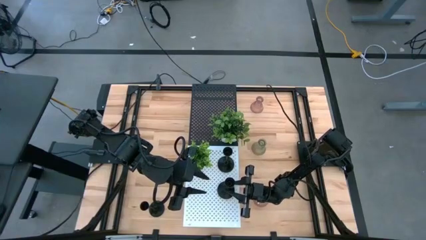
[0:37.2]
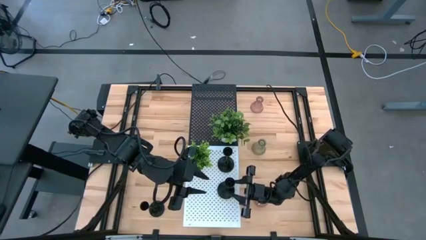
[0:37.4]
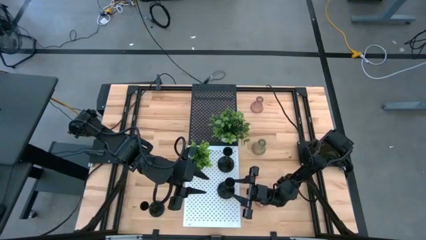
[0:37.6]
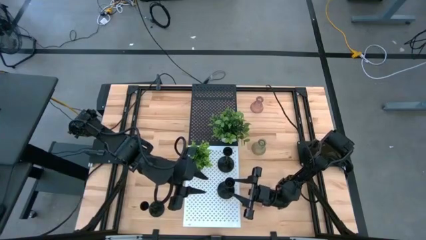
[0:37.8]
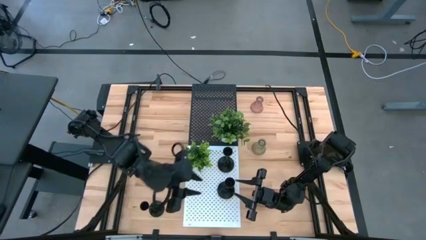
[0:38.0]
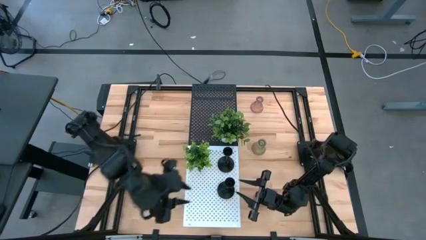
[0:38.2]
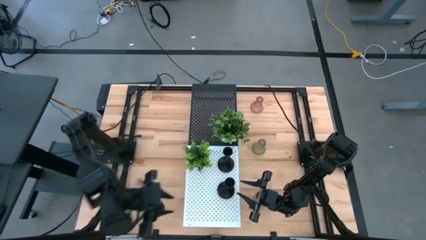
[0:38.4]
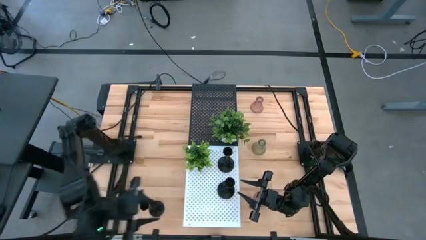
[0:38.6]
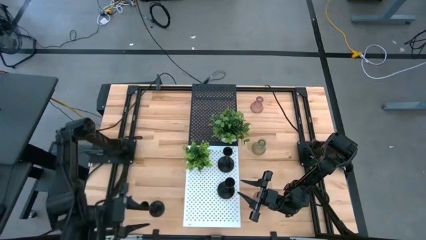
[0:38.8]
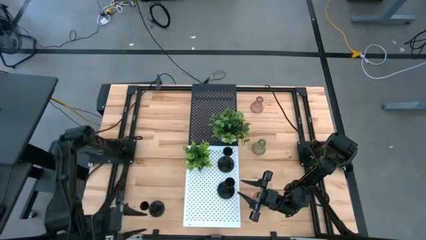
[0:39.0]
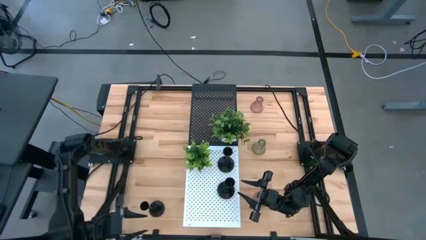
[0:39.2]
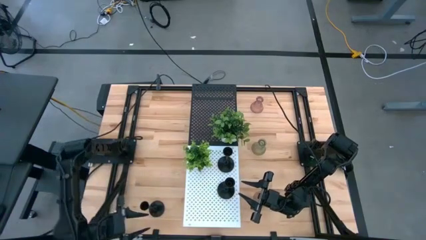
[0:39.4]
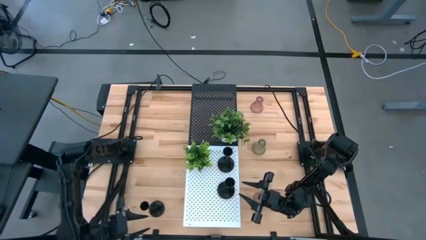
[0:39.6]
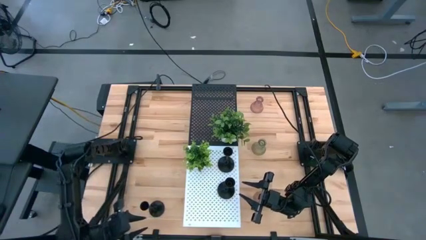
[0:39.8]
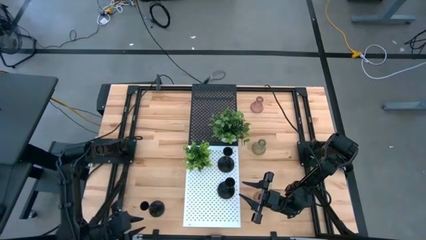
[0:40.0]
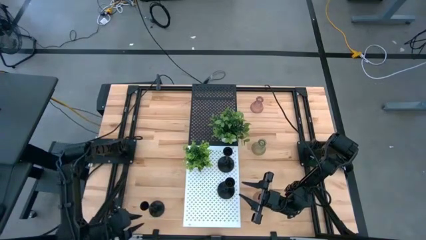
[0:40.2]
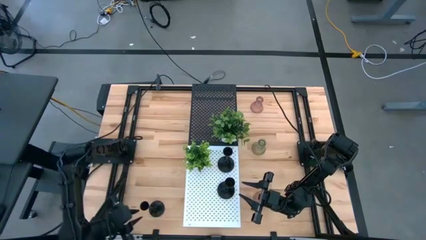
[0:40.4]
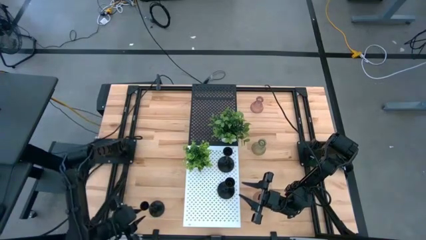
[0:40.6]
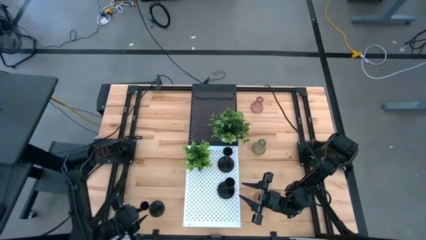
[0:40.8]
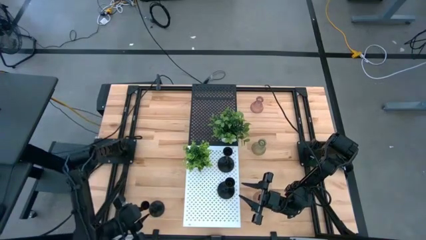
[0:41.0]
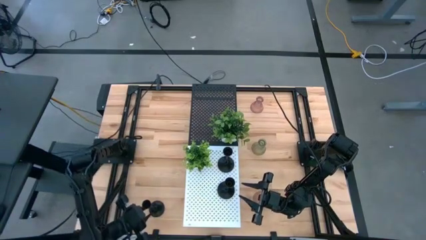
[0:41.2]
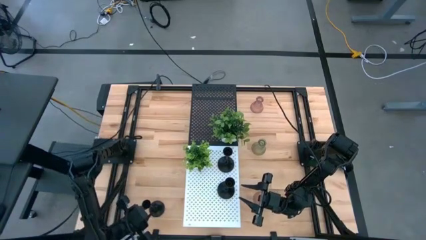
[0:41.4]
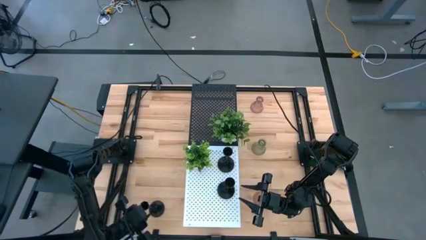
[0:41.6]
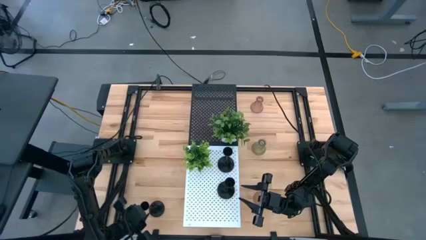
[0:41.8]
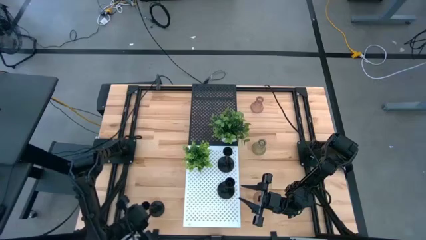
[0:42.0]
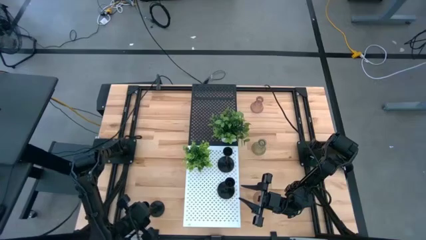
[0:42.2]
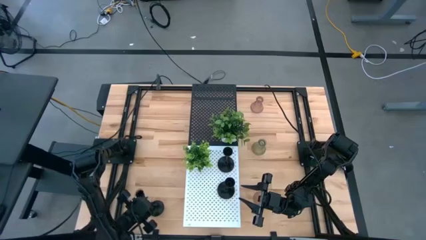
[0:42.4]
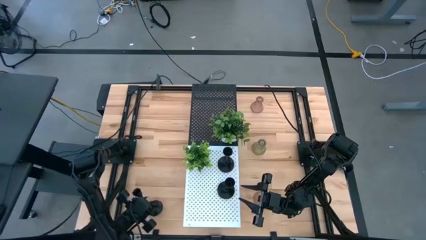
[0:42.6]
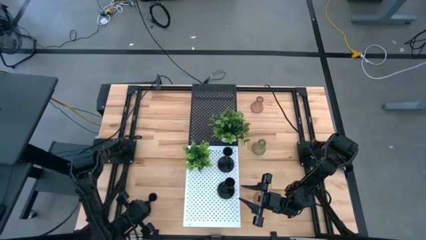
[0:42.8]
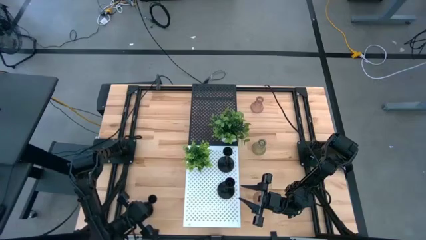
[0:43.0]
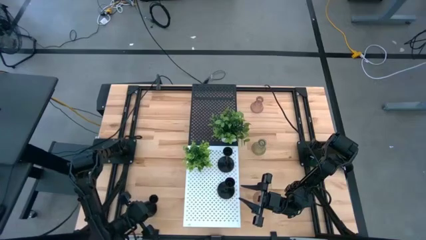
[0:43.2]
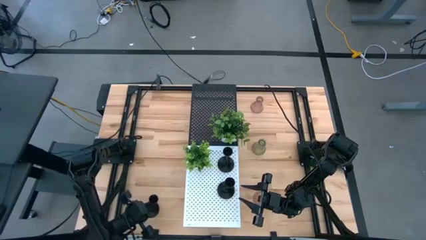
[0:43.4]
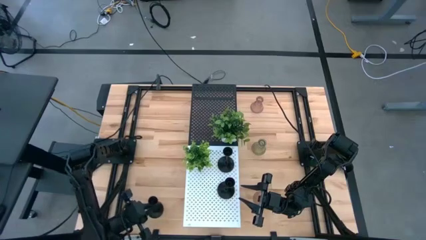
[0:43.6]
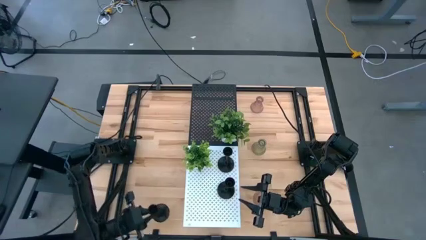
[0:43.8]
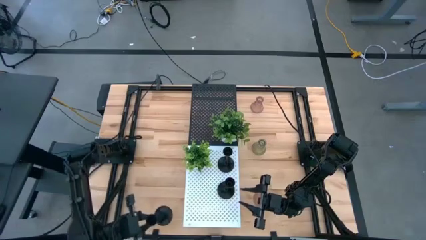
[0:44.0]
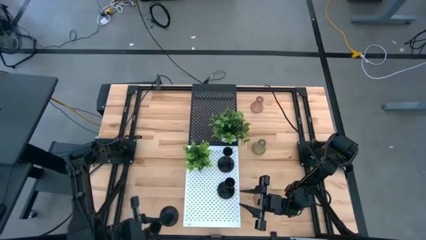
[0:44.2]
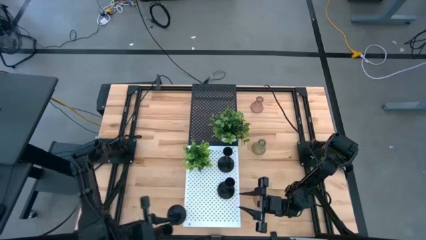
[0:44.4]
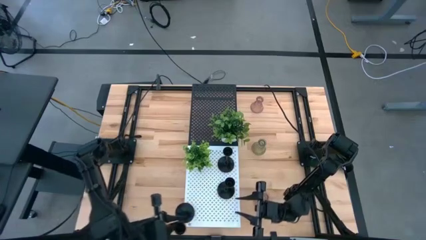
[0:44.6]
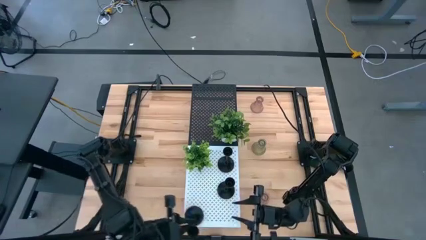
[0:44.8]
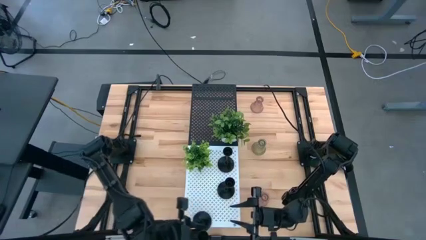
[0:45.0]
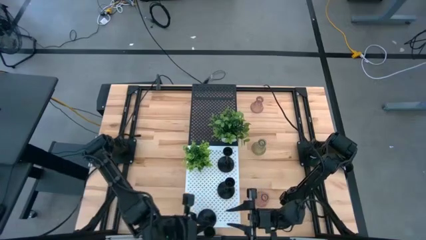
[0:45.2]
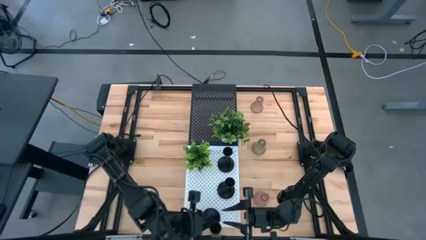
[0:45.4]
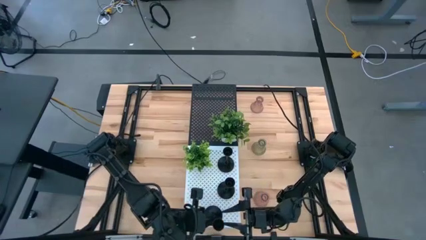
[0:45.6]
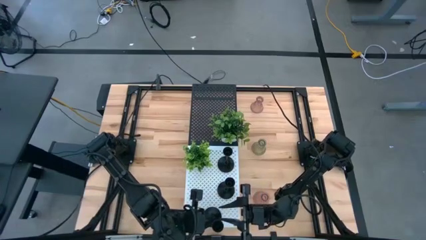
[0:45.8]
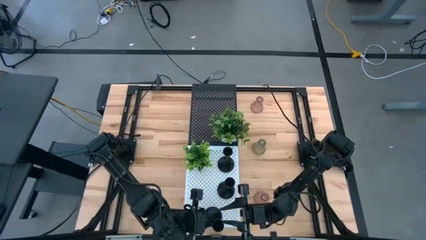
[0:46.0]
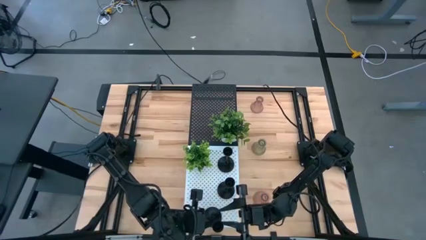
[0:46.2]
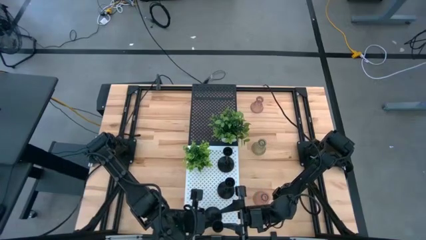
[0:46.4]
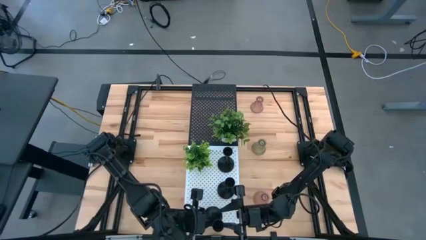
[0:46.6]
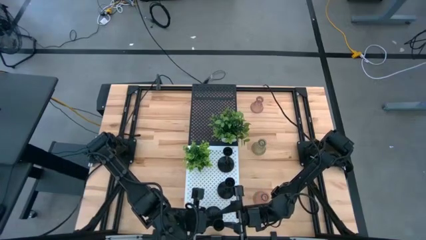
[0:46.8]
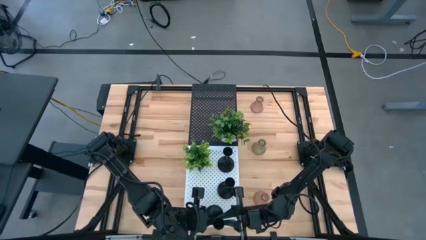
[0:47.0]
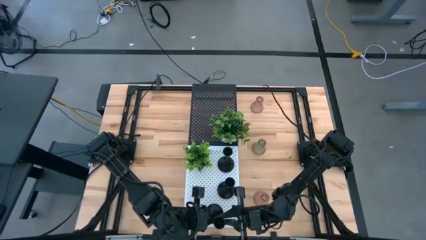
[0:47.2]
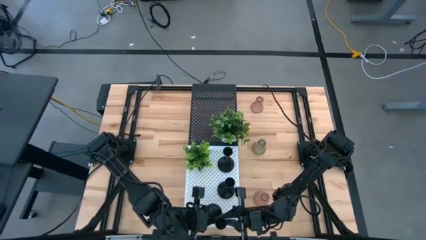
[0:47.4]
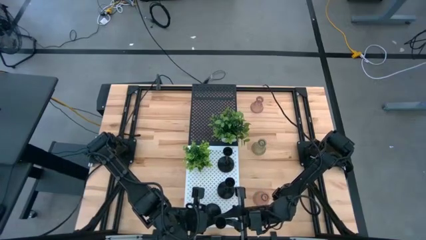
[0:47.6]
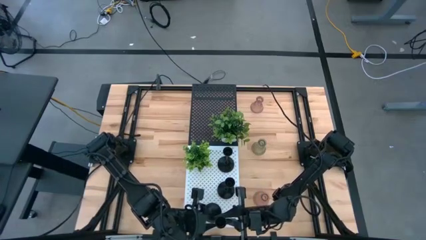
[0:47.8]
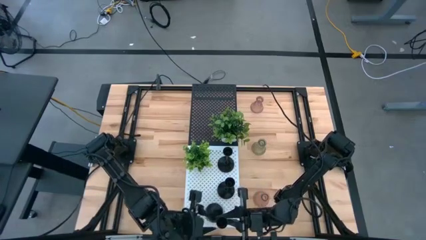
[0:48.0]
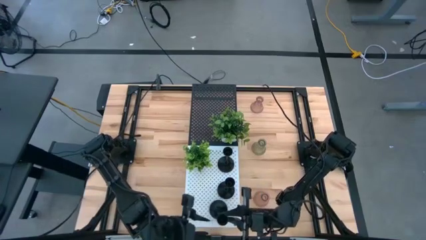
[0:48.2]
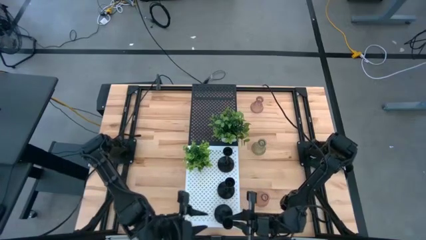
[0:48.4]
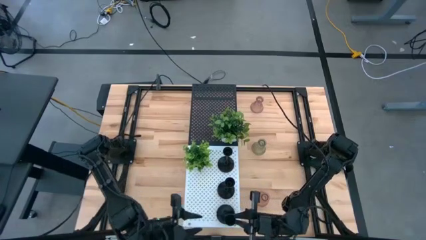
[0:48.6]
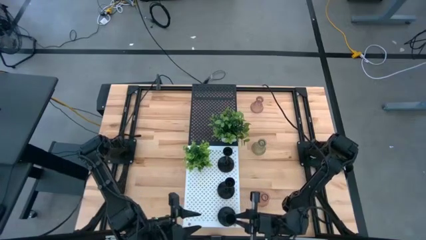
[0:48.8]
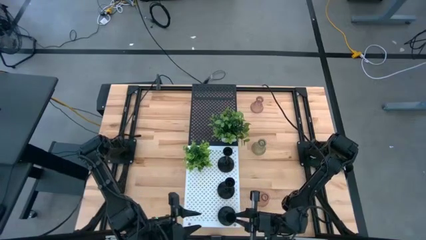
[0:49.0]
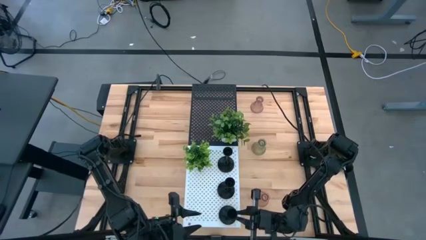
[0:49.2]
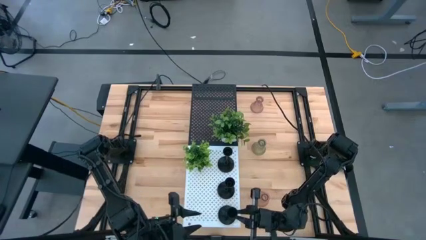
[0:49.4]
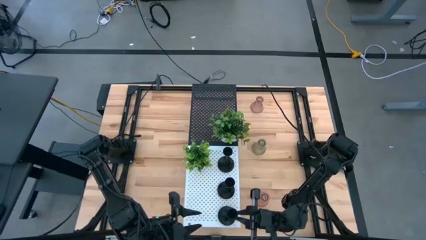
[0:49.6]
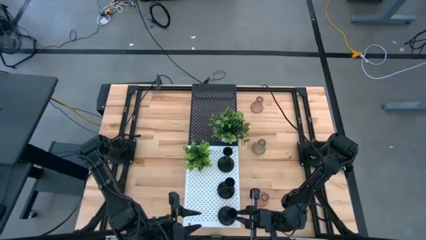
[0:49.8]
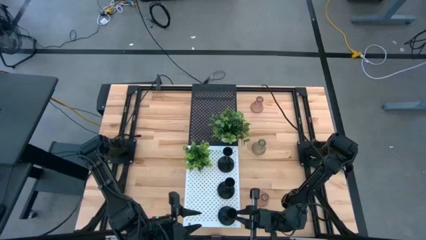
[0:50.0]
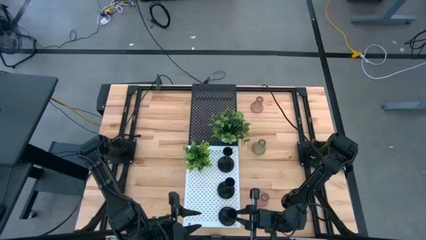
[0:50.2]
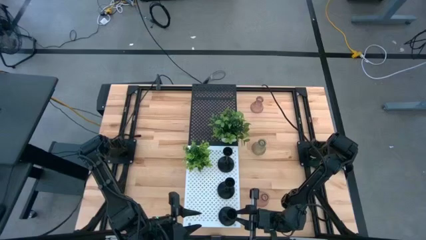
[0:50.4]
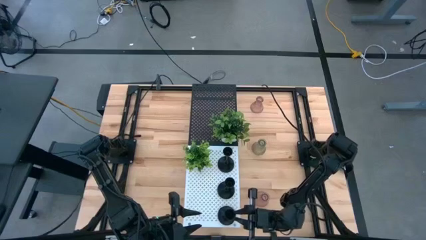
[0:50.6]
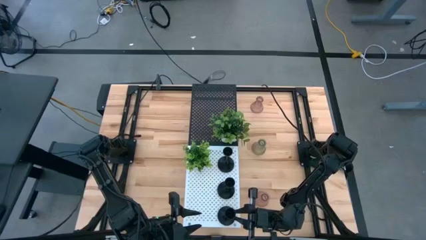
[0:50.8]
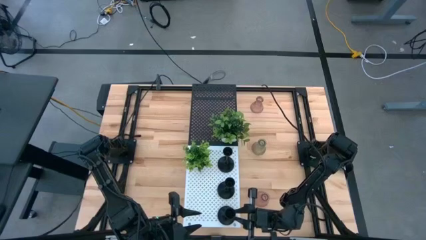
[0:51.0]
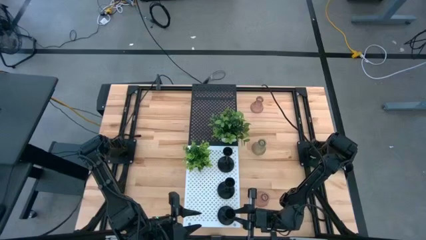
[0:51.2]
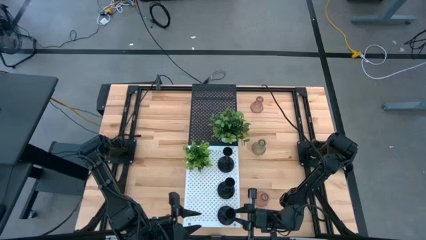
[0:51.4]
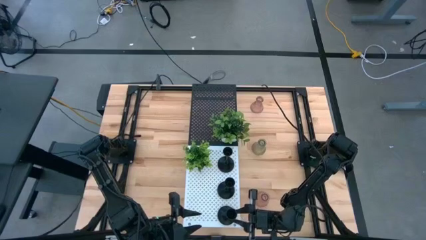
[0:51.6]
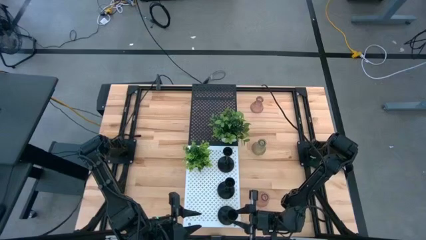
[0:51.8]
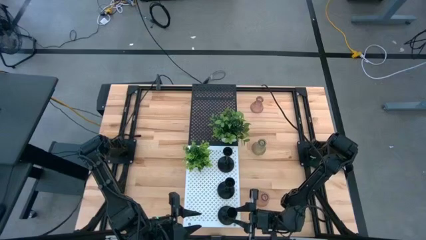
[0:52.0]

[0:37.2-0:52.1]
Task: Pick & Place candle stick holders
Put the black candle holder on the white shelf

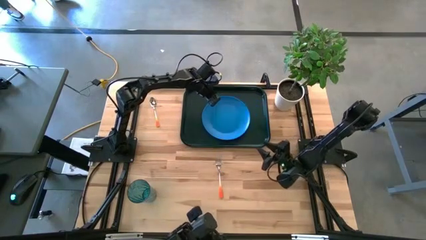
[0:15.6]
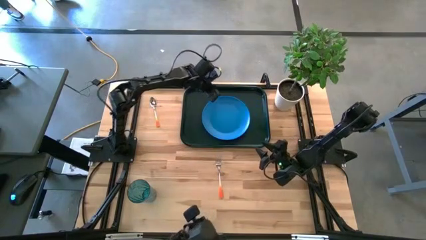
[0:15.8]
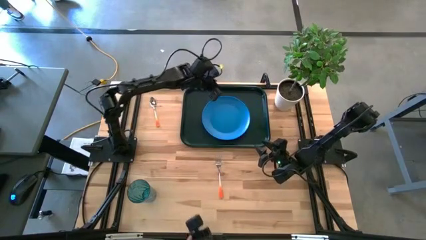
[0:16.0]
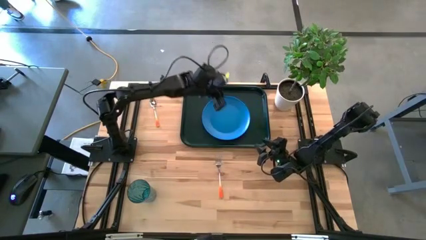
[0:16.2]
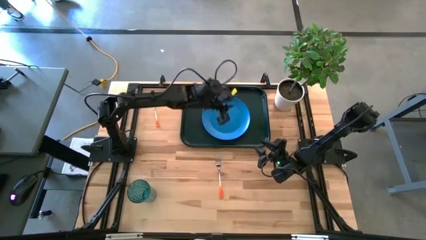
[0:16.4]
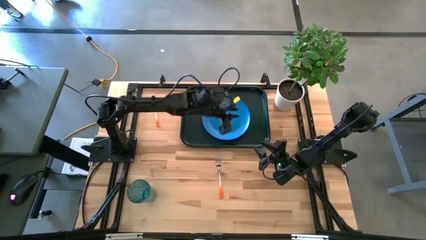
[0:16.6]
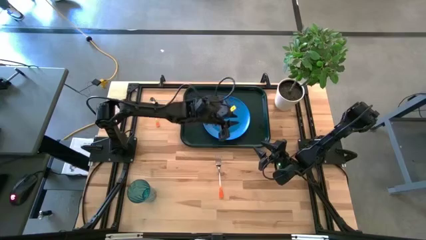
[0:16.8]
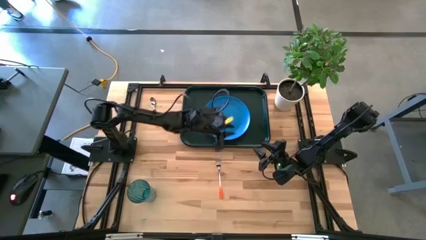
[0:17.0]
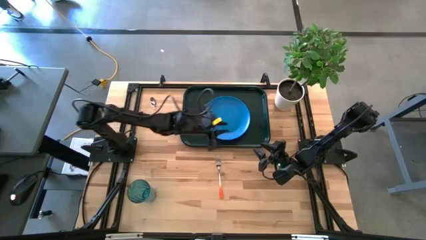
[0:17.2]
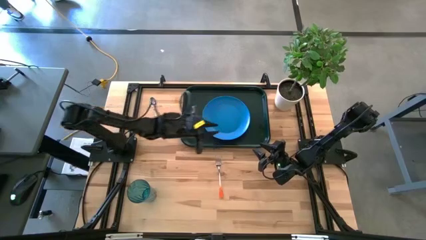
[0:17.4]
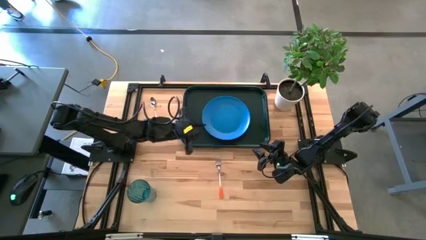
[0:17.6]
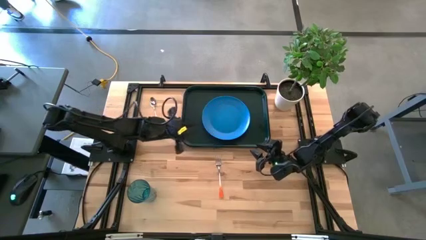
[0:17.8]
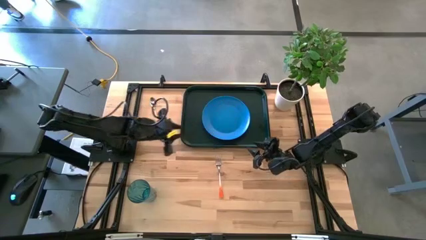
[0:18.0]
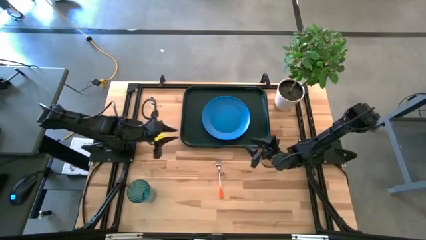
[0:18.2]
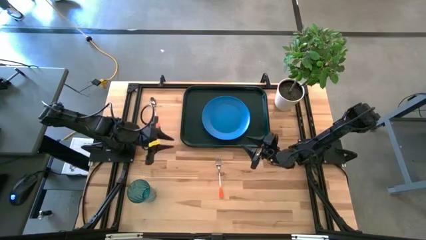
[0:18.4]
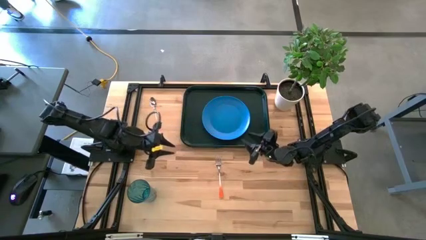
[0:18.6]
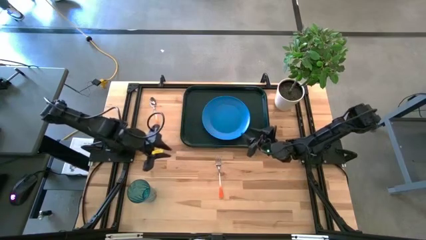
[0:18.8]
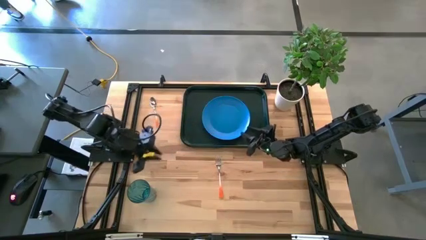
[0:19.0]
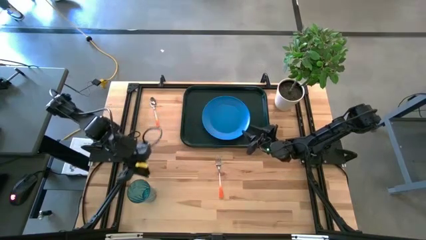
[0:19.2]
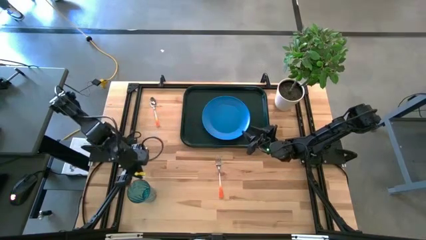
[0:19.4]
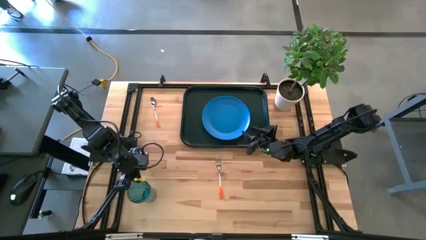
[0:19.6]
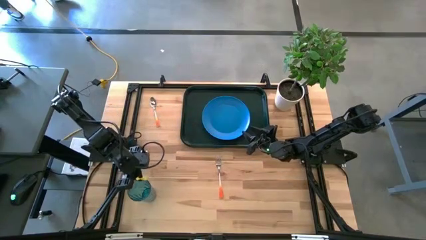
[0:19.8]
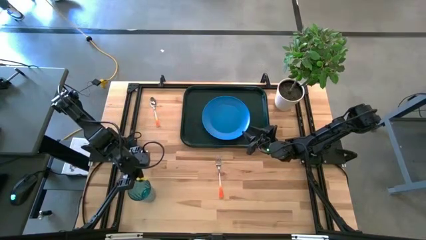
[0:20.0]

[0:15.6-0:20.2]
Task: Pick and place plate/cup/fork/spoon on tray
Put the blue cup to the top left of the blue plate on the green tray
